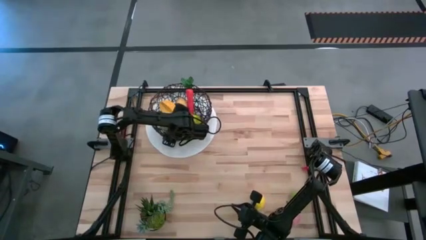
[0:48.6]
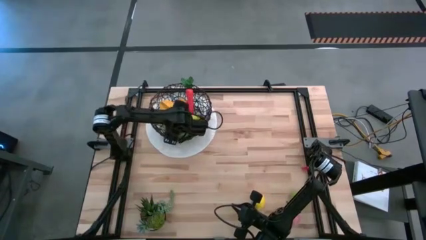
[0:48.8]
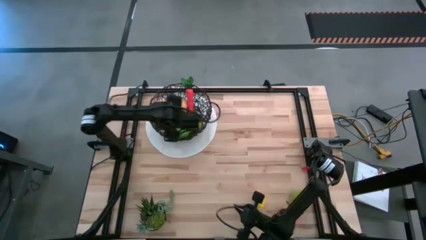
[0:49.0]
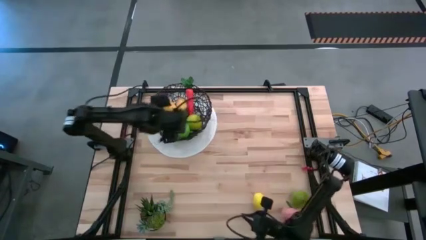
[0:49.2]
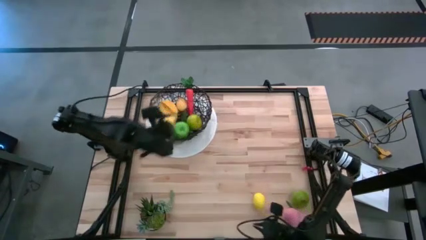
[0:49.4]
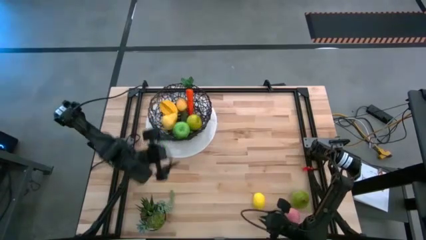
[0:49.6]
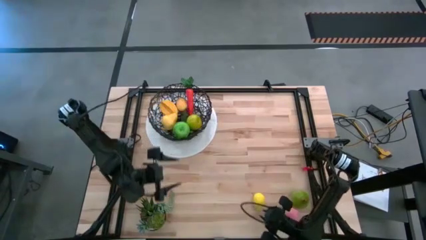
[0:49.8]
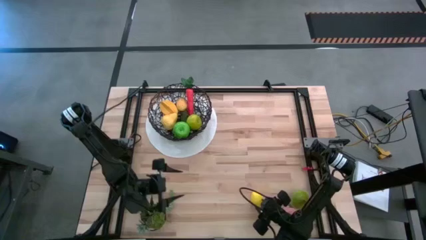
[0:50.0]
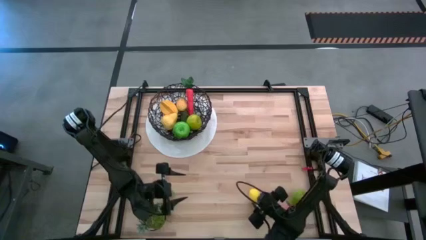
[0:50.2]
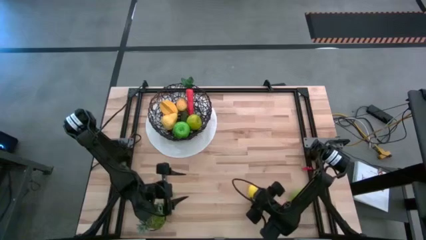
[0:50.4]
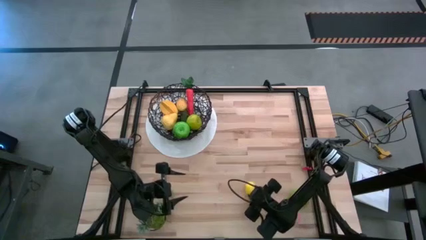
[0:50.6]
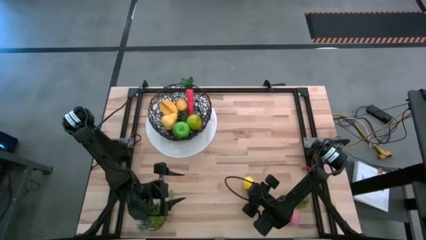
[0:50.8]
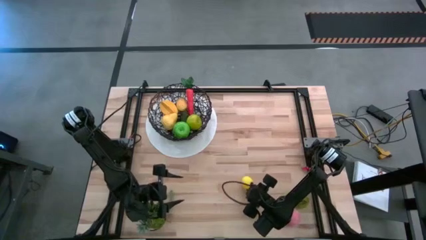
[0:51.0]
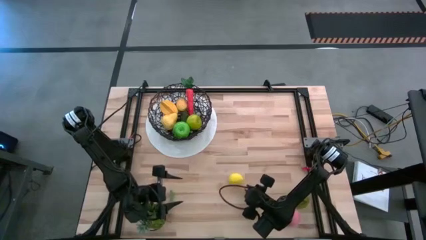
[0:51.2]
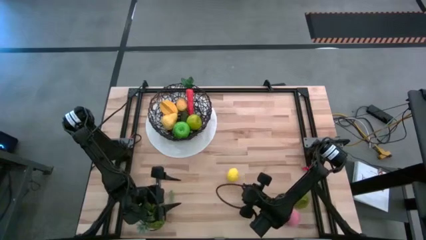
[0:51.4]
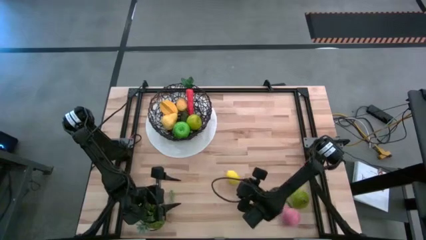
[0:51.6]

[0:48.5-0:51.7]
Task: Build produce basket
Put the lemon into the wire basket

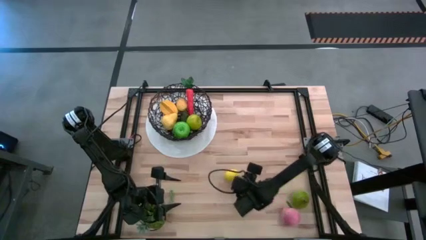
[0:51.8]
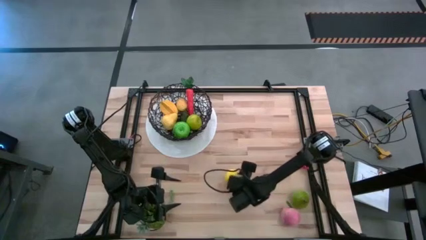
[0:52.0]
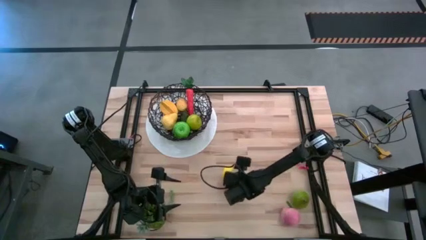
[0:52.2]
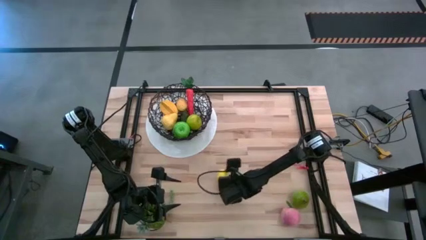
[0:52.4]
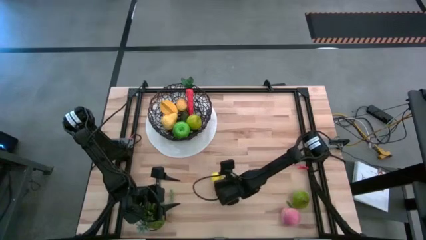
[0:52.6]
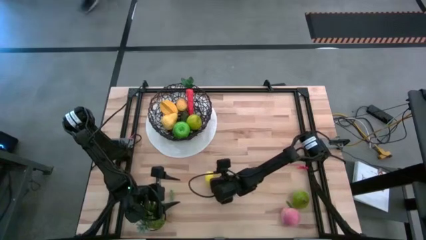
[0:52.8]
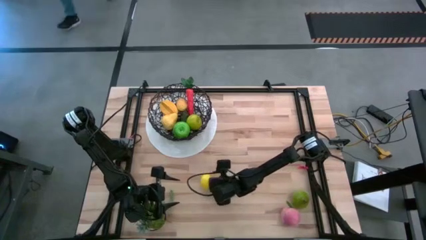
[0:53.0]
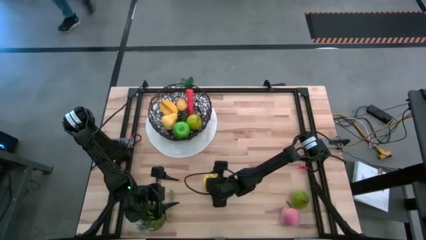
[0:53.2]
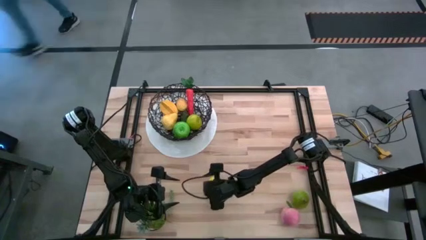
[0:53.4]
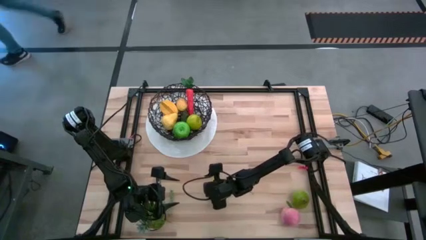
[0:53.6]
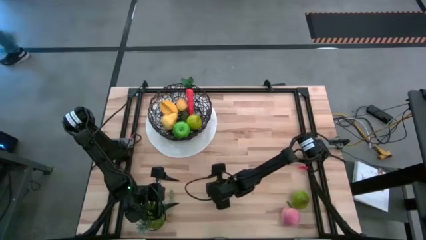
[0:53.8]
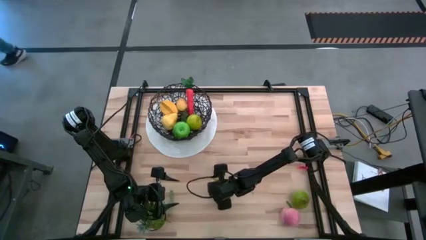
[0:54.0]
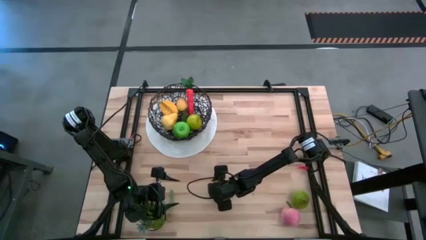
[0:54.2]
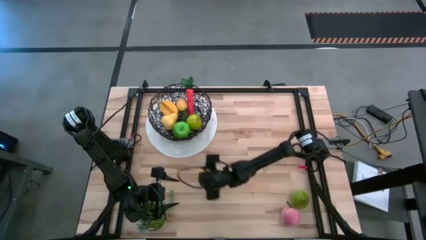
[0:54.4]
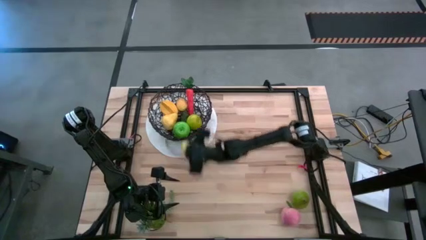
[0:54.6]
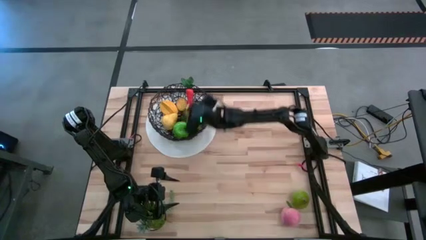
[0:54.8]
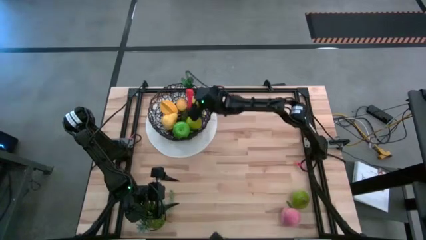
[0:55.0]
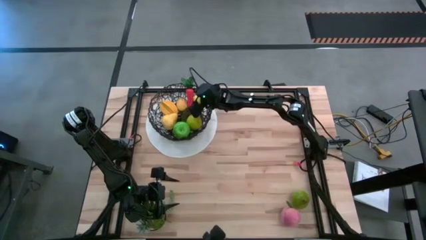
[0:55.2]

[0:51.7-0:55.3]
Put the lemon into the wire basket

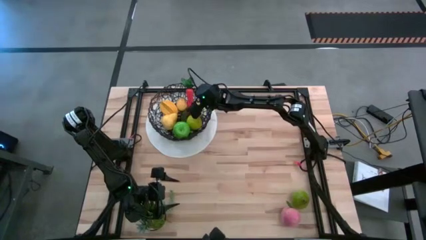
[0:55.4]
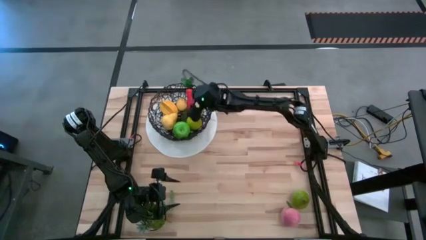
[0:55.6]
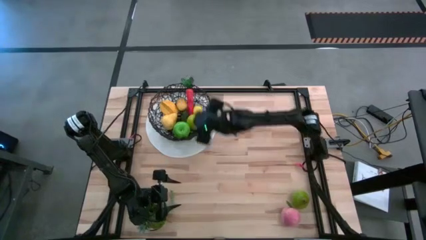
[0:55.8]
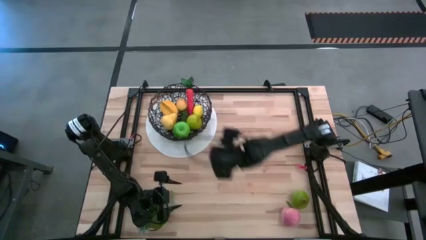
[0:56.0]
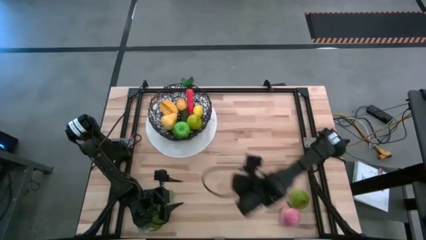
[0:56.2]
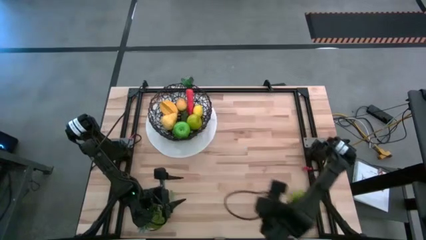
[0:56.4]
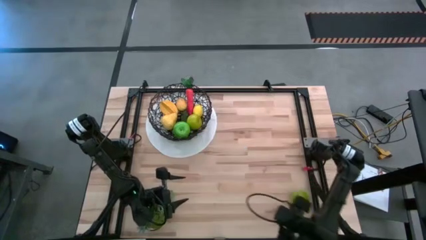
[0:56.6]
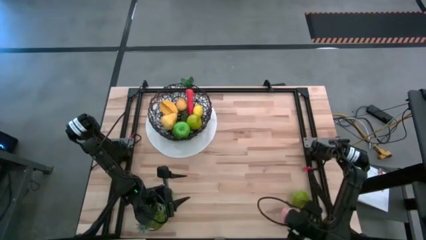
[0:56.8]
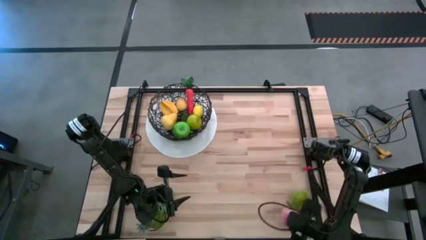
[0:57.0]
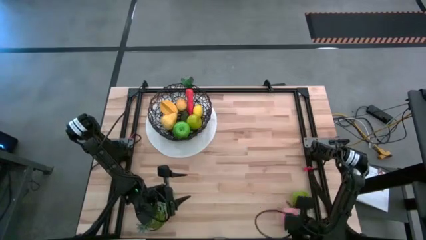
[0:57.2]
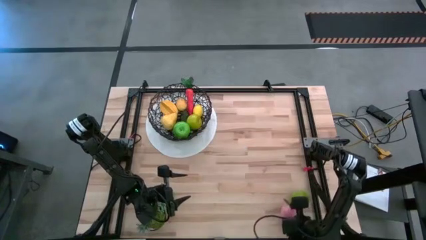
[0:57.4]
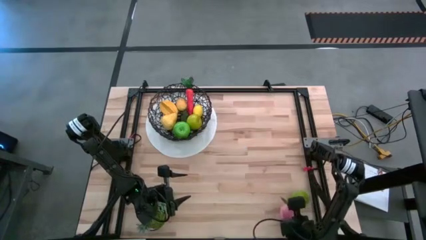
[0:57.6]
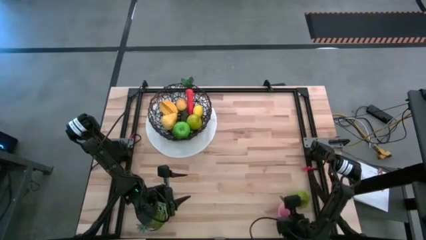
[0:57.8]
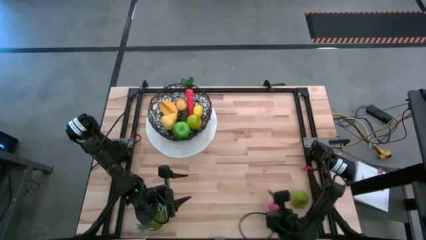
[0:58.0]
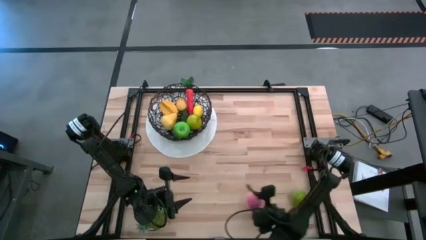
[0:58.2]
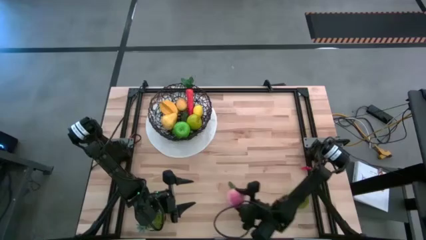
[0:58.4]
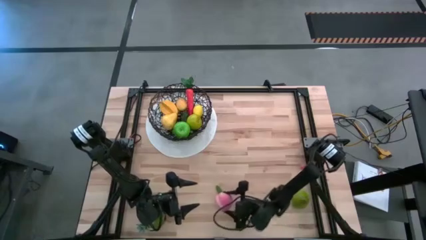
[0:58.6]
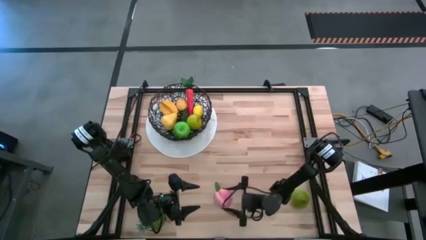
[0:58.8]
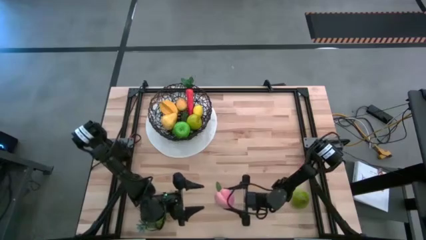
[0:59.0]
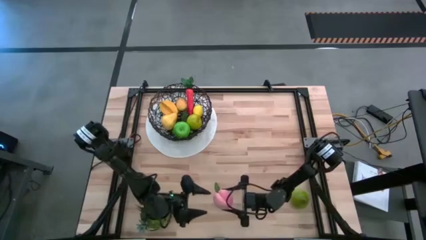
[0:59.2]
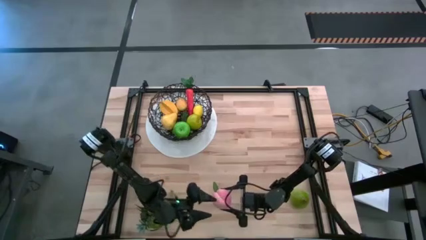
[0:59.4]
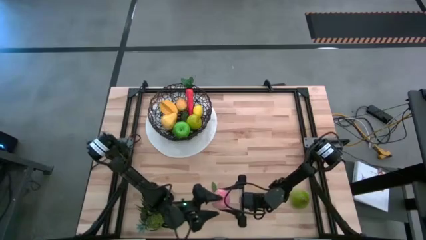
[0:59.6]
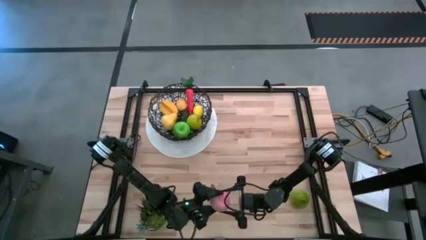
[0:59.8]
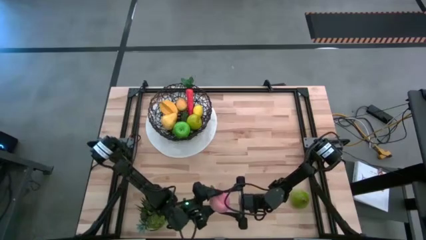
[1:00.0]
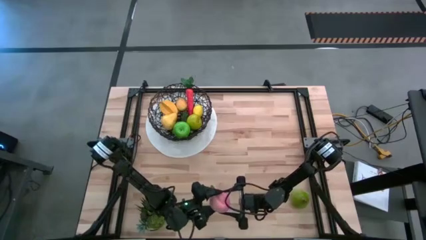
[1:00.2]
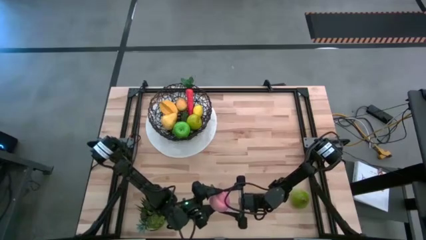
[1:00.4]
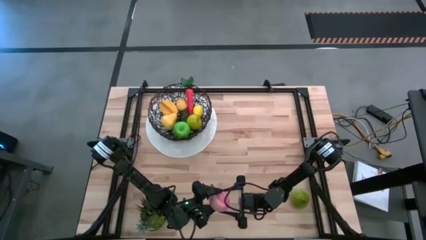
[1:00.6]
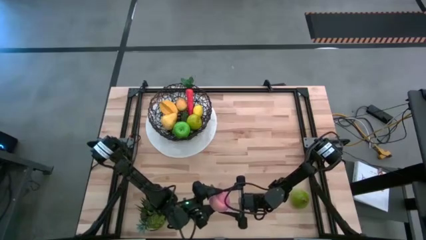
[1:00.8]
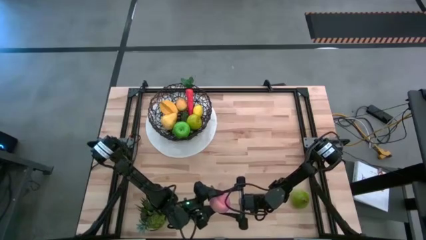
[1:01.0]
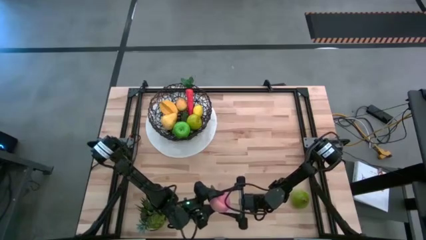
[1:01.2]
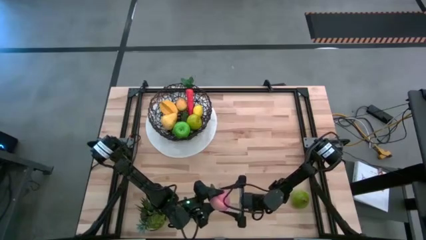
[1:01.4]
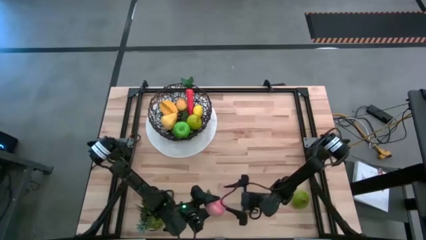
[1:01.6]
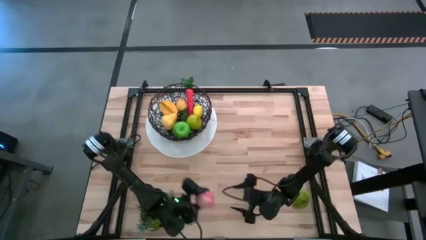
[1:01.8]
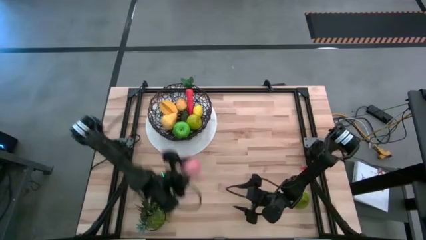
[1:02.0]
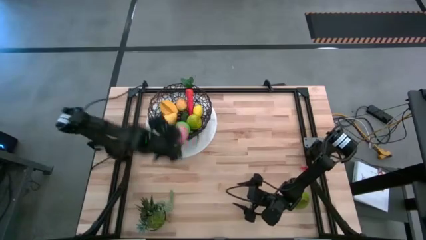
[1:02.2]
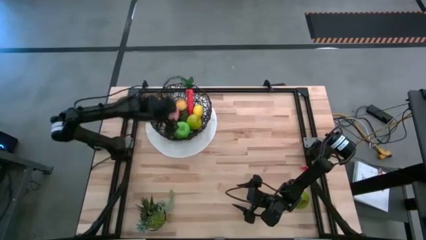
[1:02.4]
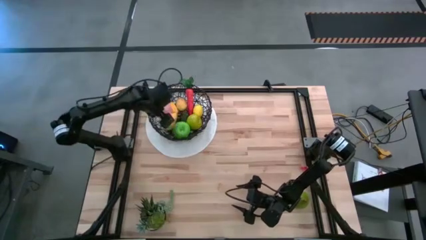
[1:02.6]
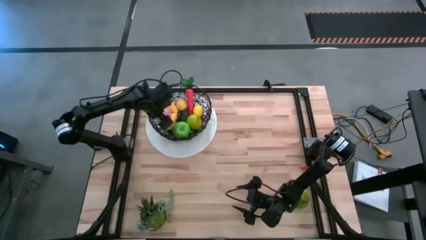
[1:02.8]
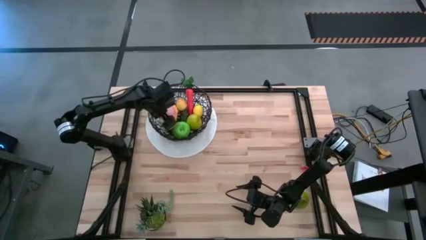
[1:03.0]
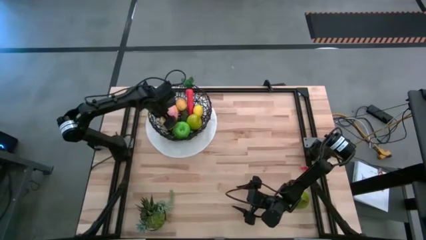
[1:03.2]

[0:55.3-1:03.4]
Put the peach into the wire basket

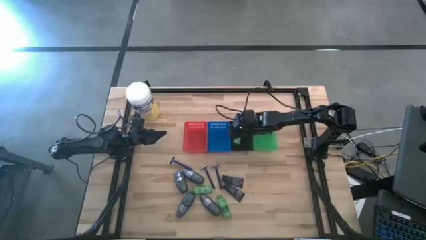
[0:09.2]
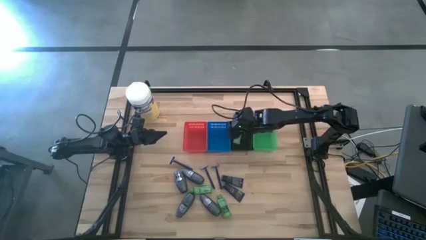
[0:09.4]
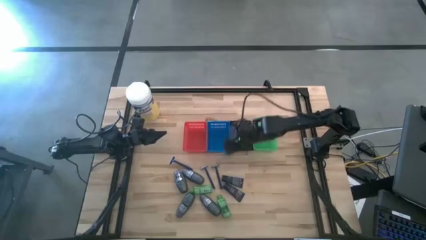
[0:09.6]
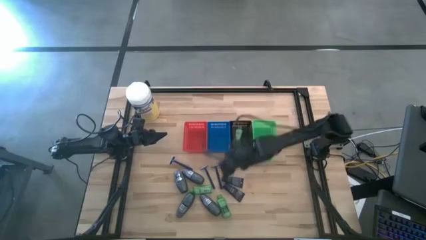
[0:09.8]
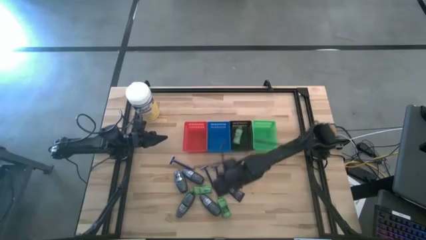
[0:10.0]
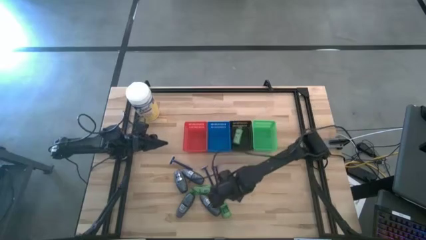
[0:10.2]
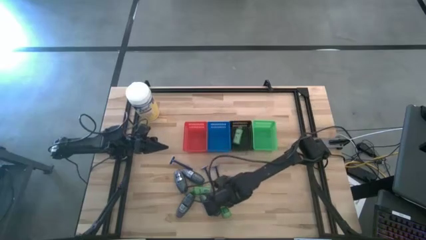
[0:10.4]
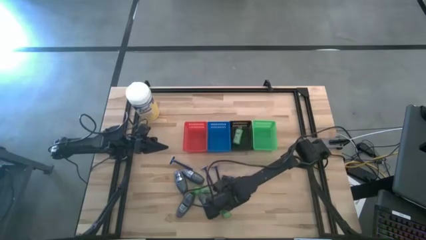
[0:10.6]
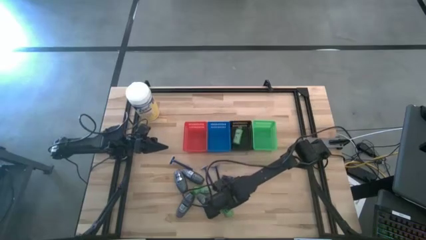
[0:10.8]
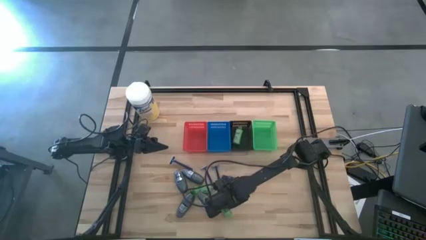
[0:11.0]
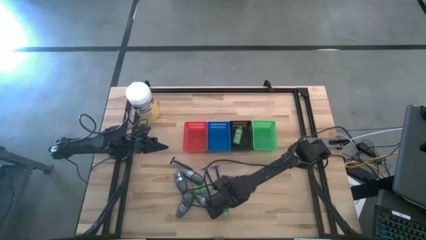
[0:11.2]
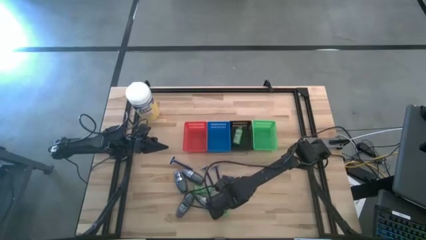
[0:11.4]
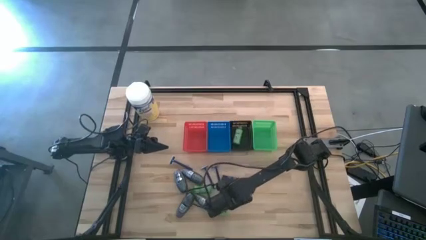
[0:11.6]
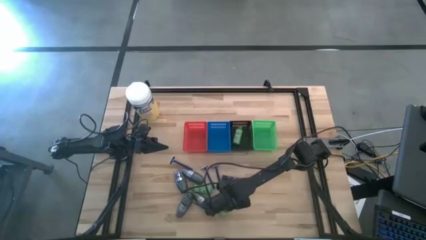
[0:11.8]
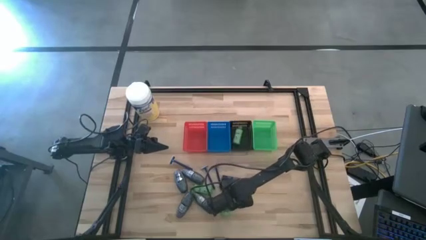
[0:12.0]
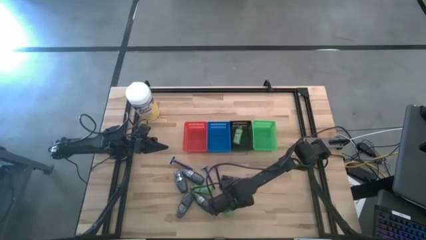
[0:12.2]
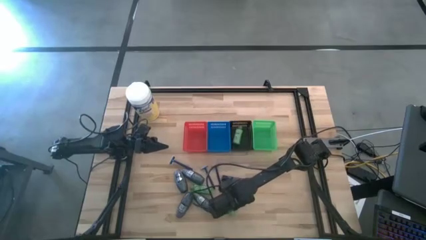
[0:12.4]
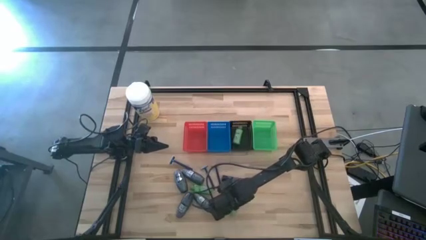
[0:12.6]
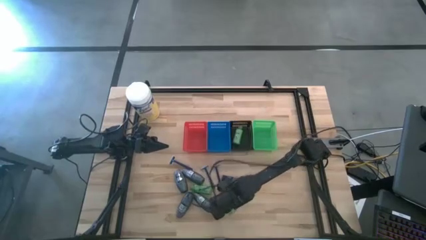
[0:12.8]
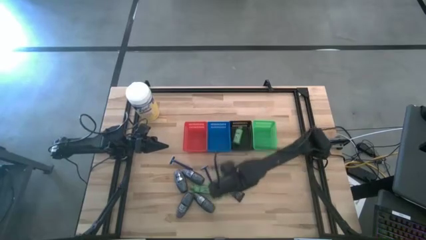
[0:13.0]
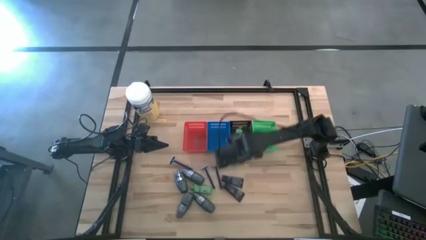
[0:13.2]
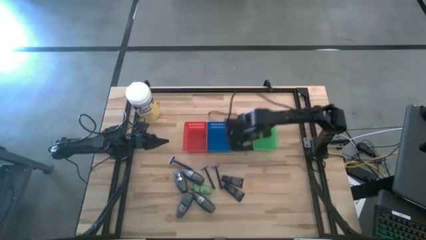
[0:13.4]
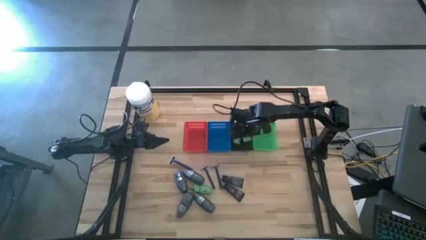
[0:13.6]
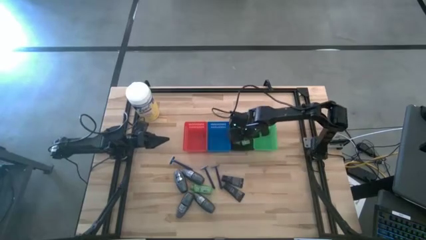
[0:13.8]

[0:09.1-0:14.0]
Task: Pick & Place Travel size toiletries
Put the shampoo into the black basket
